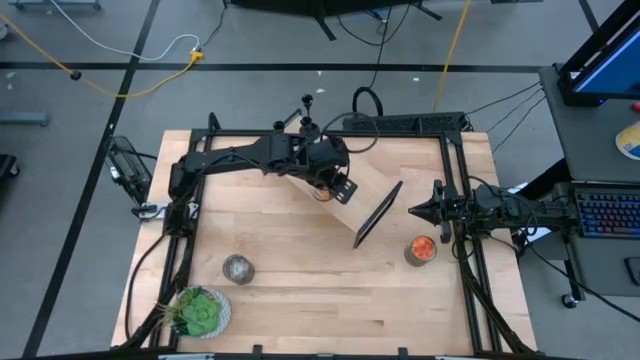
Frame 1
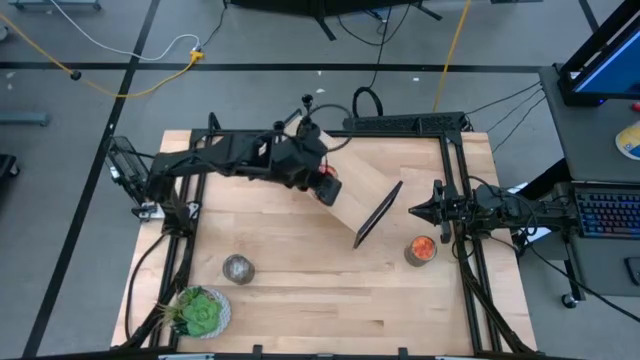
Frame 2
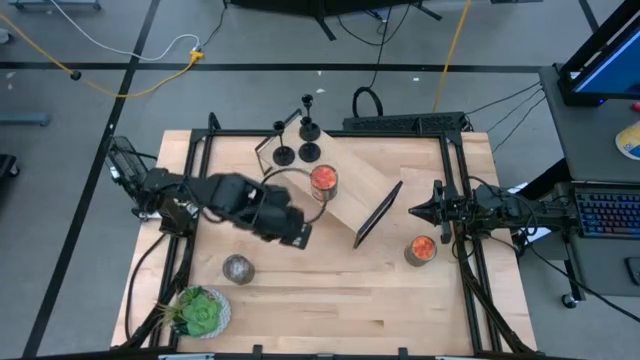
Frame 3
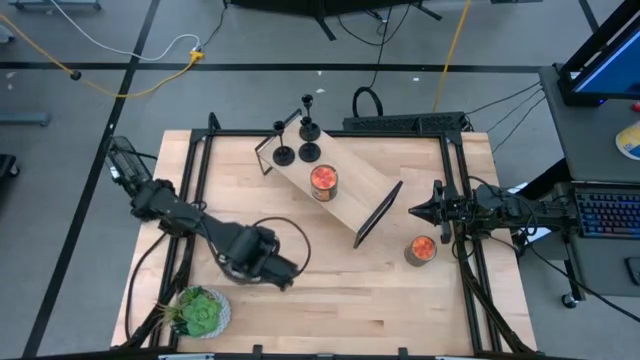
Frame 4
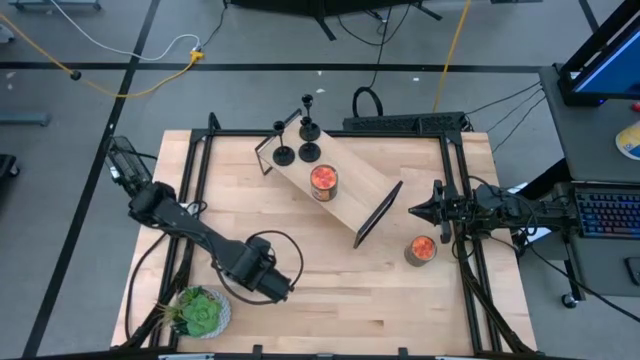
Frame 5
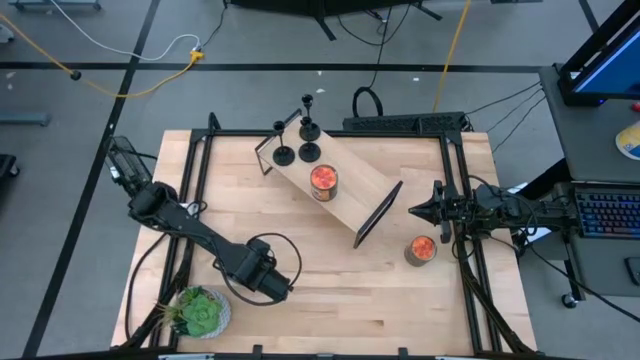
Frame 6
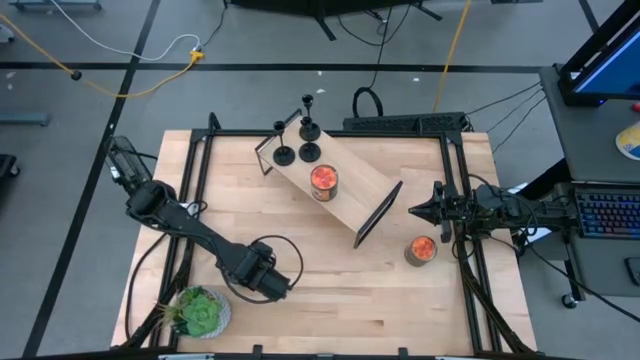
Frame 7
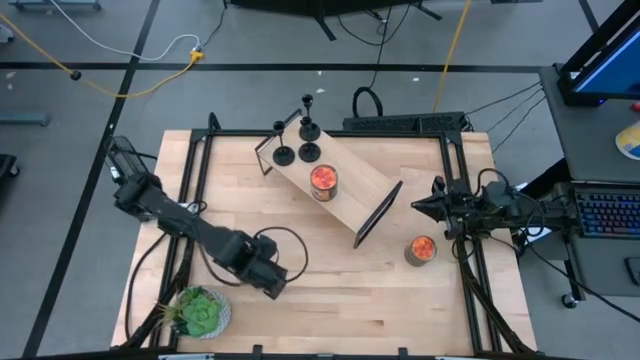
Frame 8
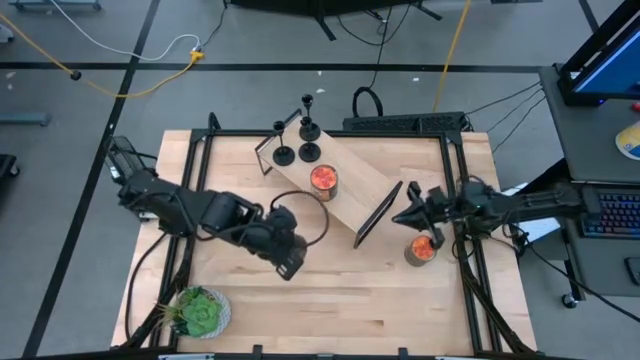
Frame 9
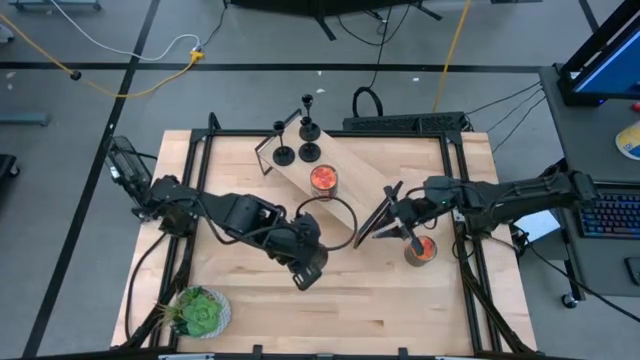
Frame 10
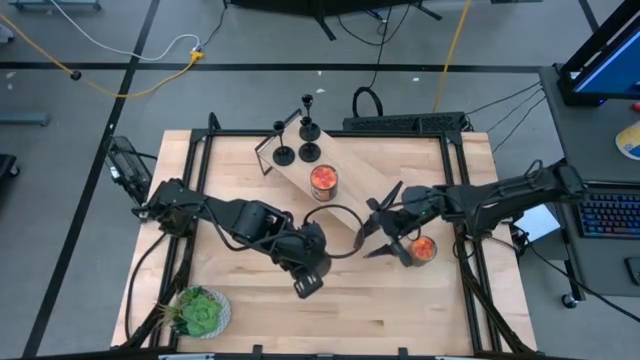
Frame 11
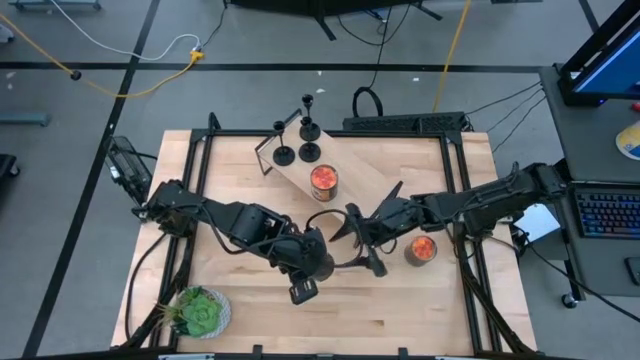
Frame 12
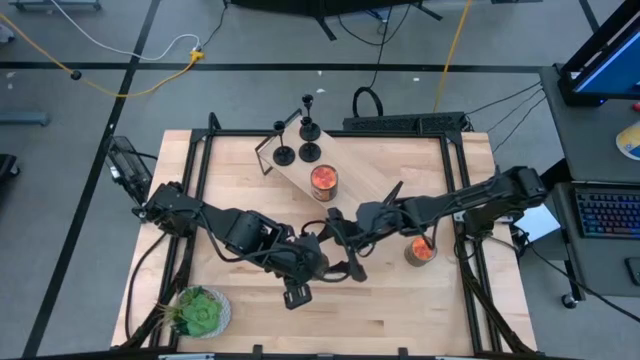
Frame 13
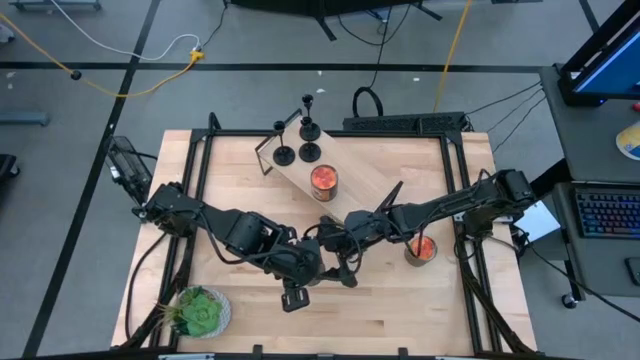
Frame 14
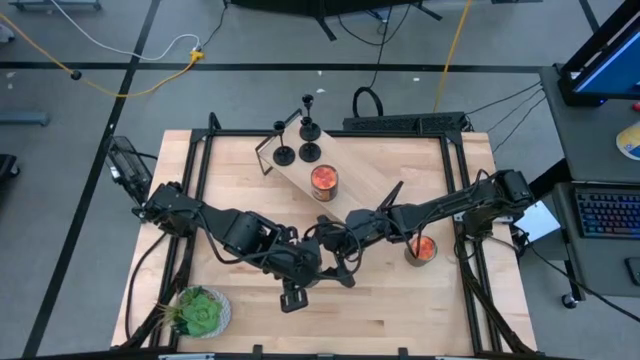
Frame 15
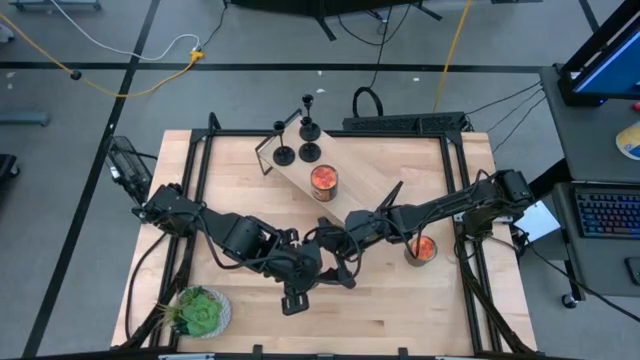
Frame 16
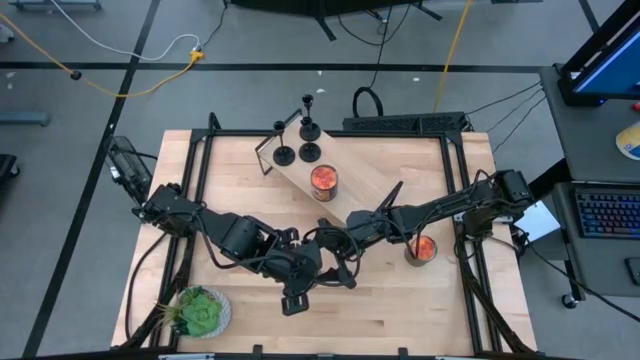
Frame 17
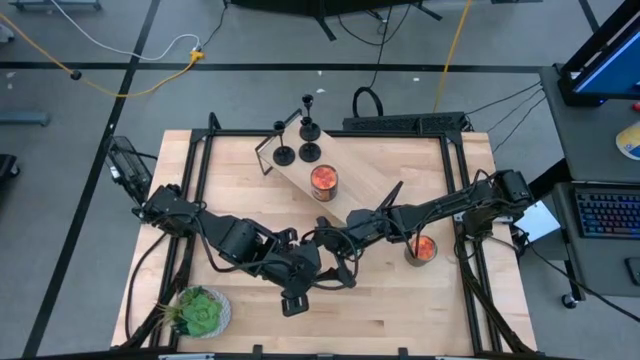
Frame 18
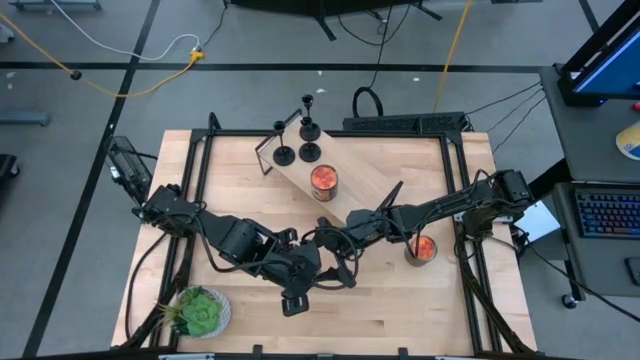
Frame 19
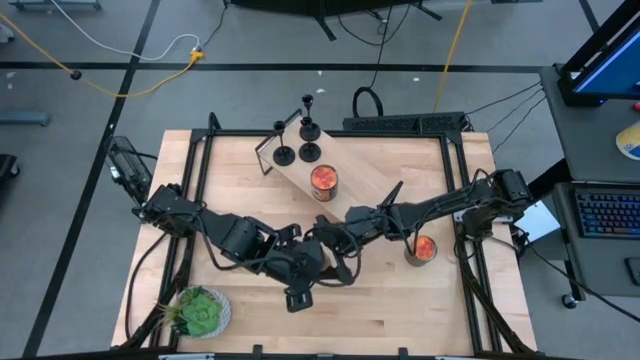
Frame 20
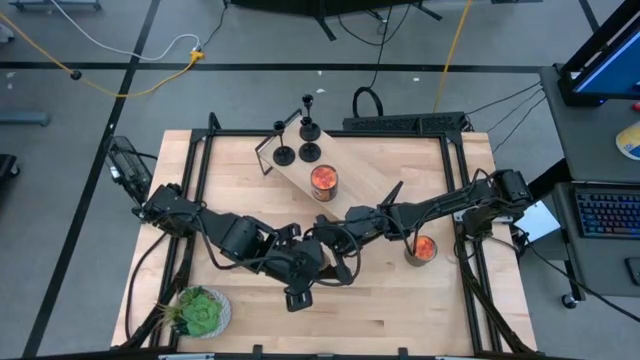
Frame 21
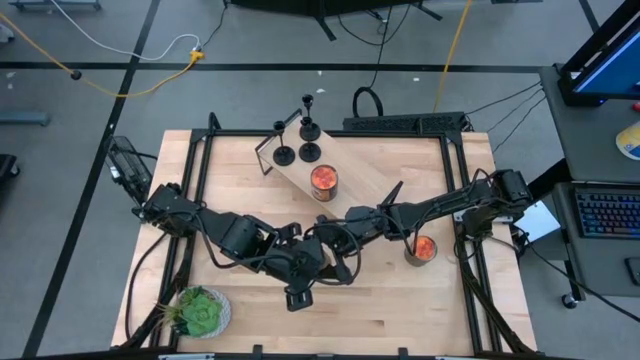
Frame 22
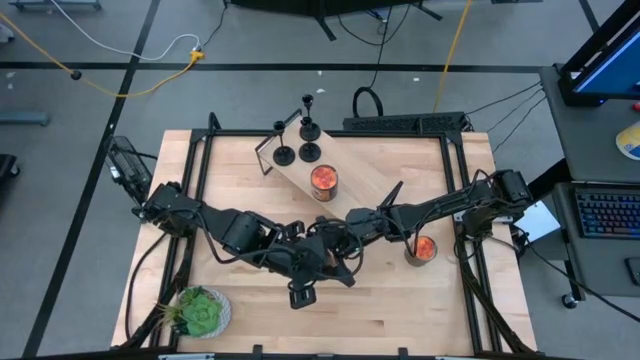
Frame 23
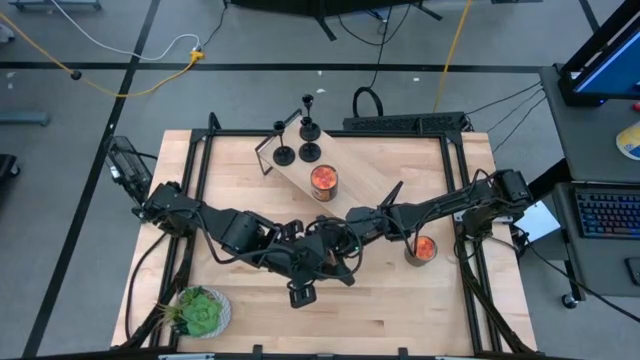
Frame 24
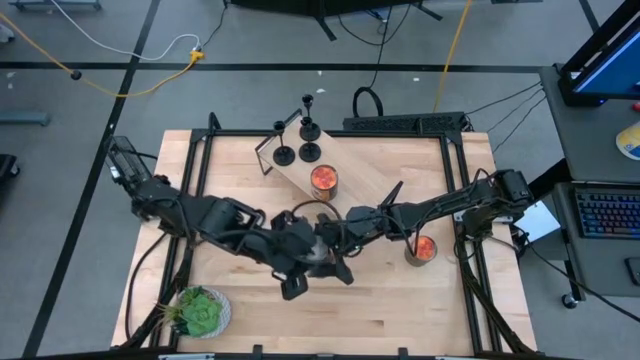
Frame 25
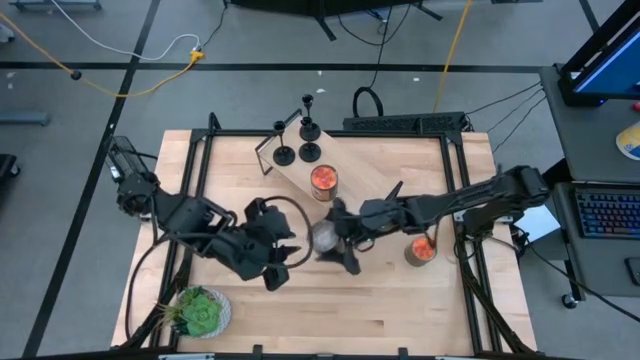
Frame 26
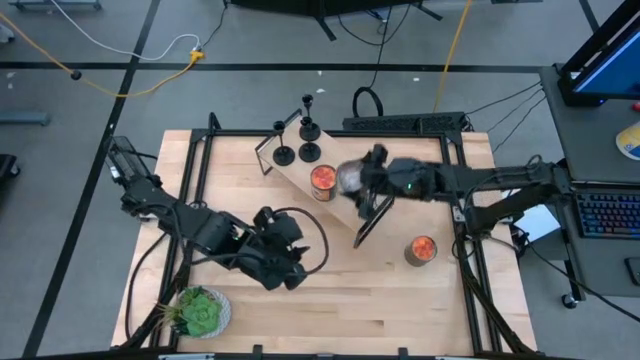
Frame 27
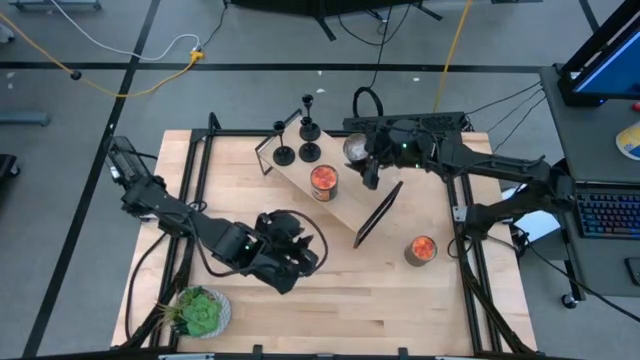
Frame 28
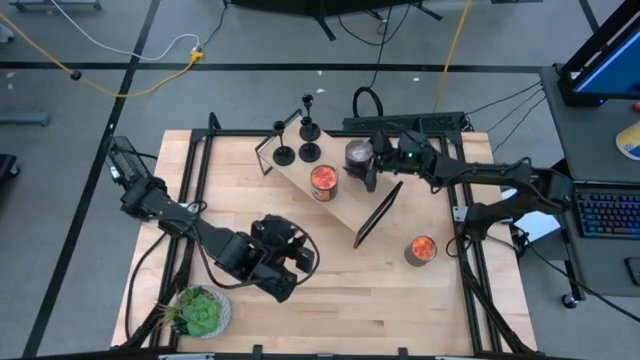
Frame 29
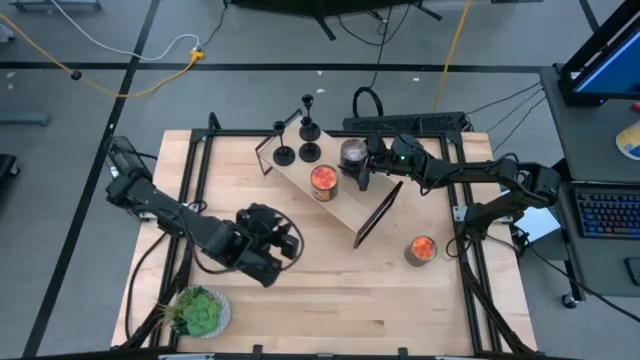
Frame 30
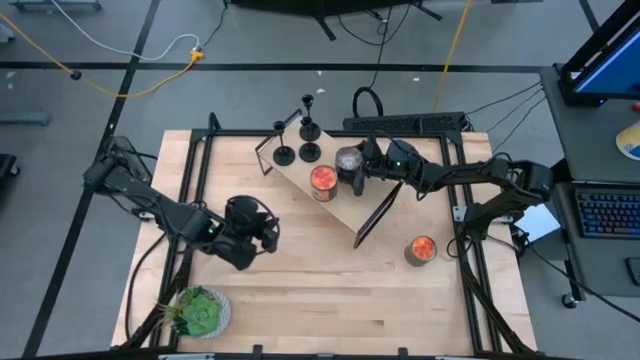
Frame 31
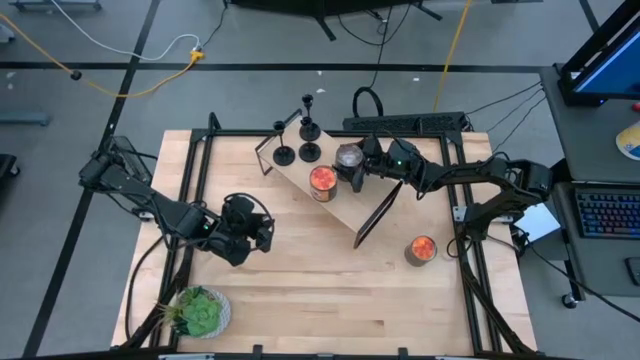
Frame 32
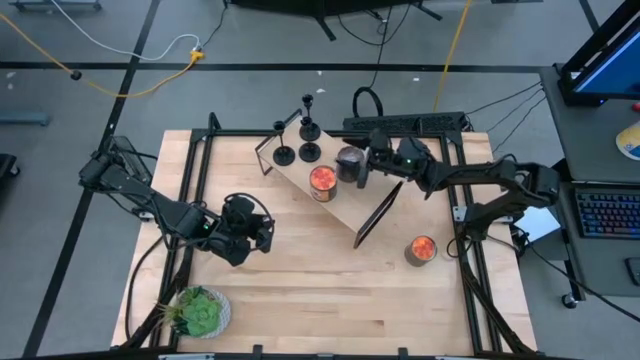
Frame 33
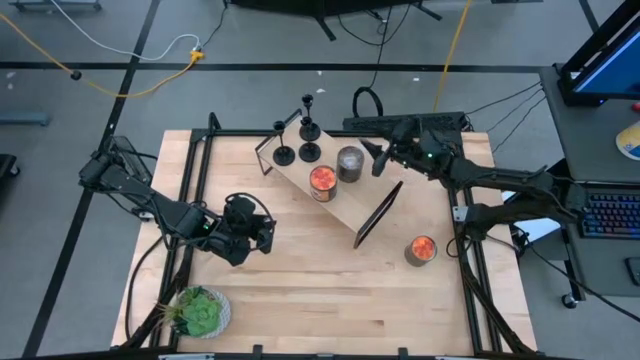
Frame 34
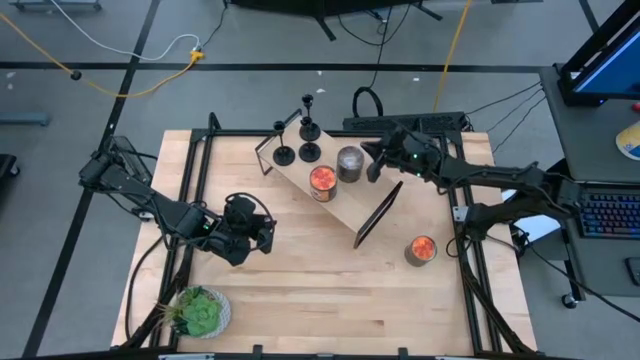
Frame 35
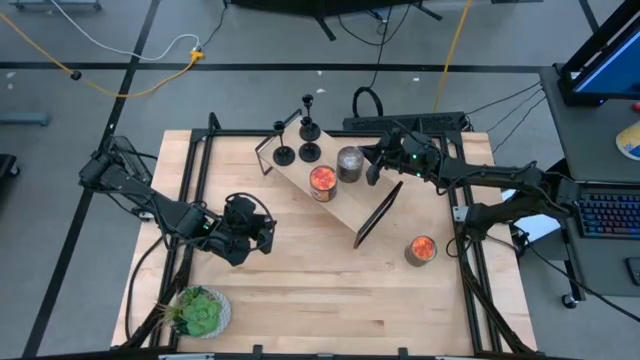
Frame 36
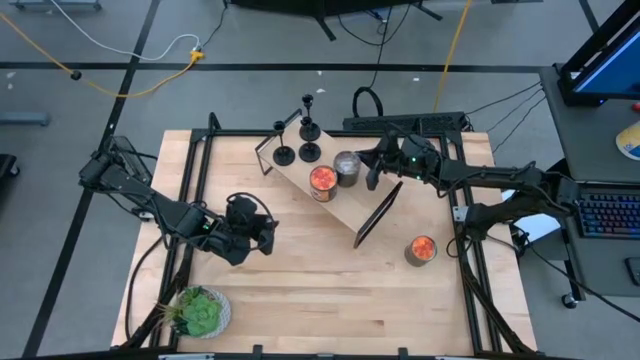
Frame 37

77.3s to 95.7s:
Task: Pick & Place candle stick holders
Put the brown scented candle on the shelf

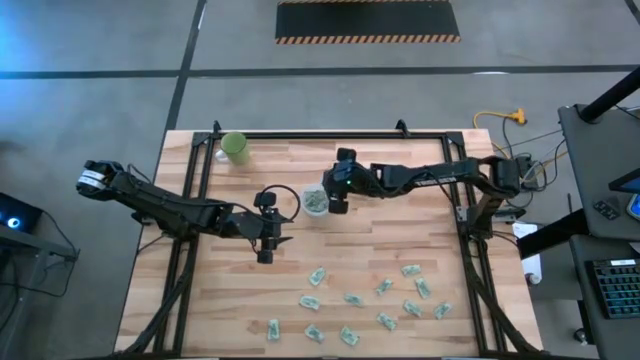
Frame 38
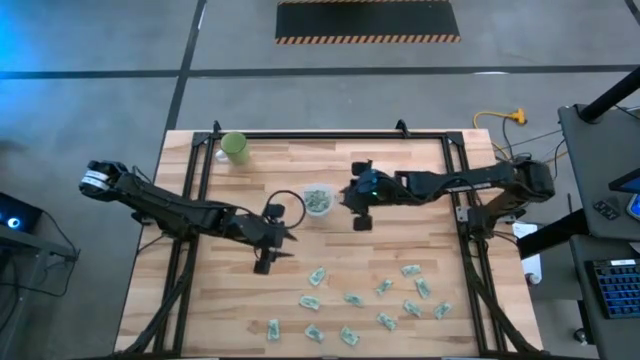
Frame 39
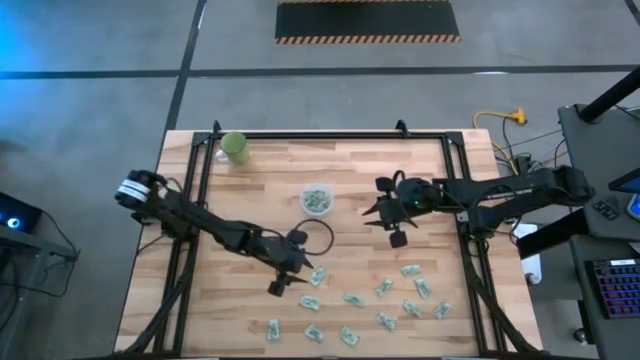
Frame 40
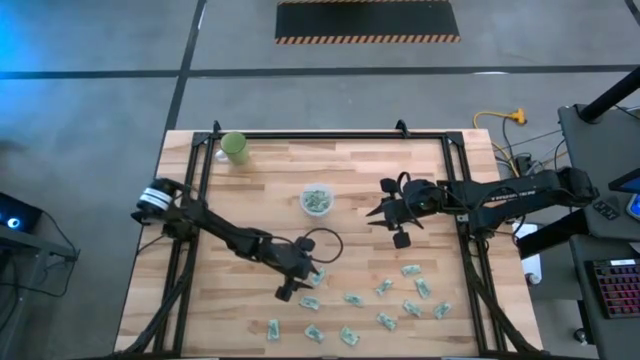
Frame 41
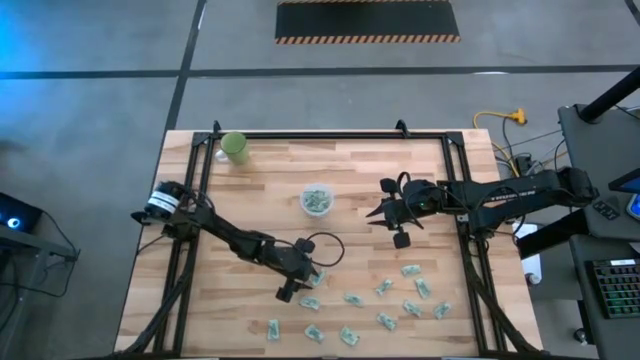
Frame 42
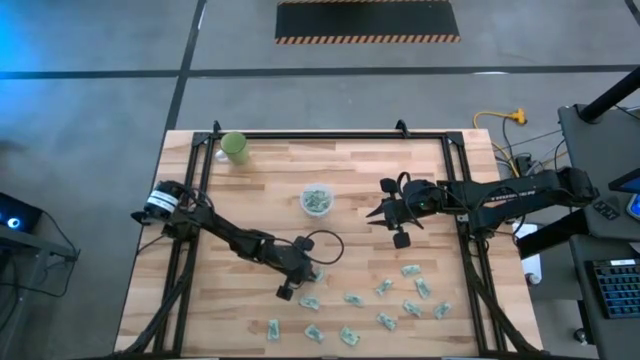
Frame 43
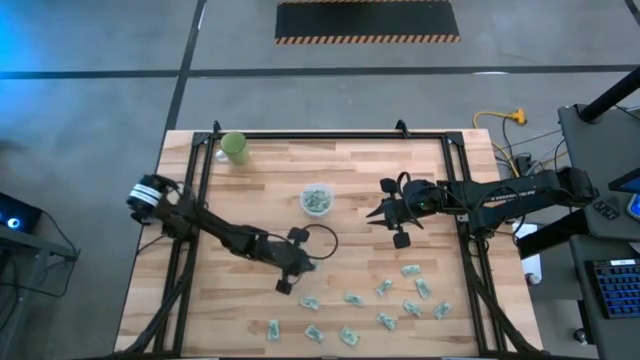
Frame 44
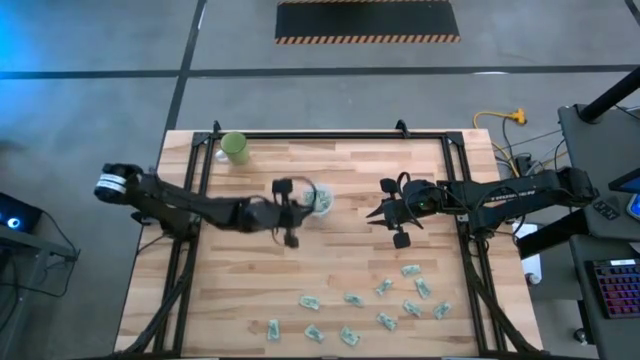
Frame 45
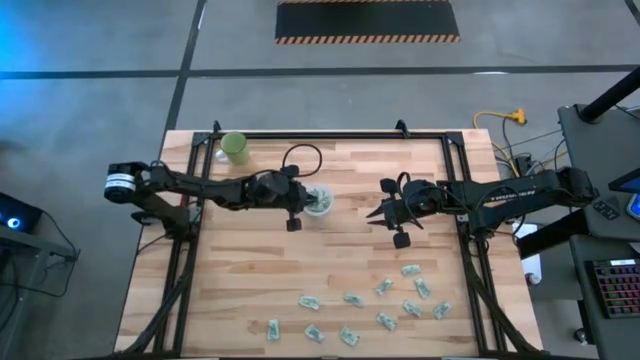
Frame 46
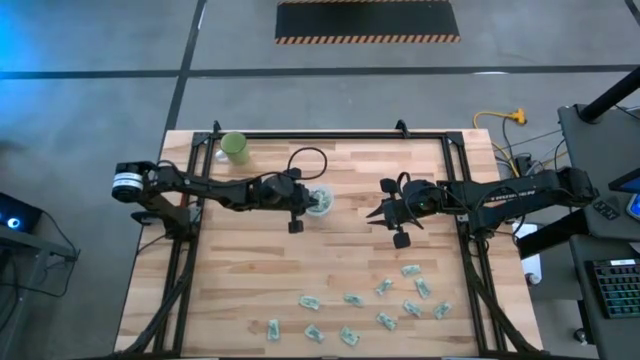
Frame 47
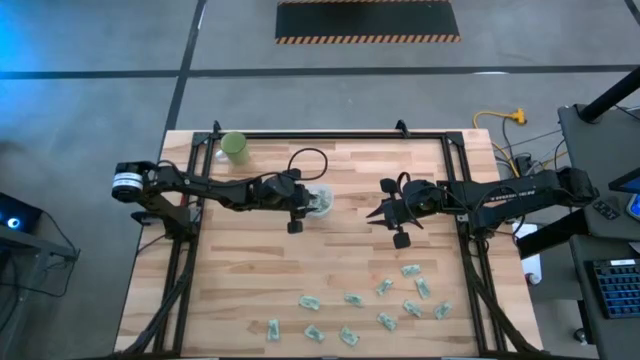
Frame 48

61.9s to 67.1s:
Task: Pick and place Stevia / Truvia into bins
Put the green stevia packet into the transparent container
